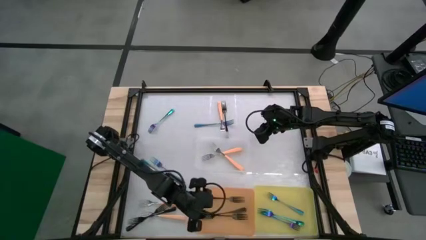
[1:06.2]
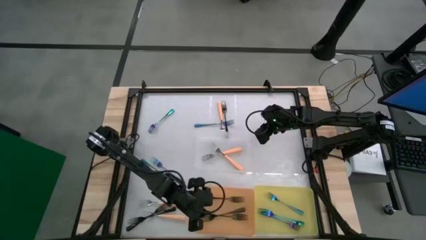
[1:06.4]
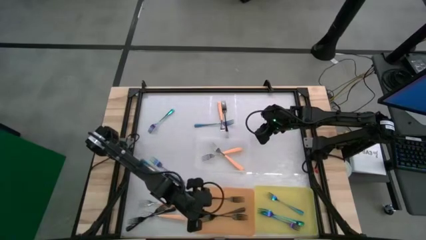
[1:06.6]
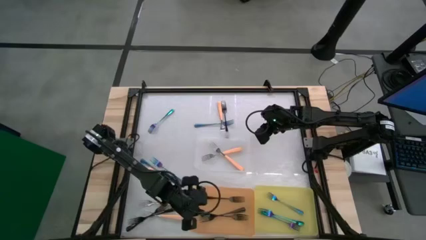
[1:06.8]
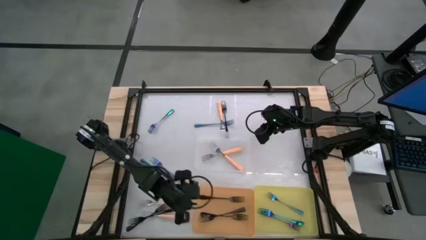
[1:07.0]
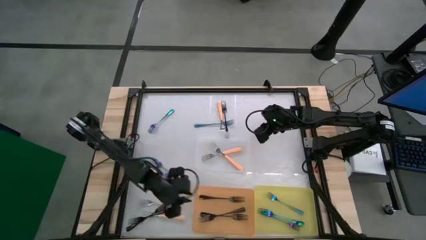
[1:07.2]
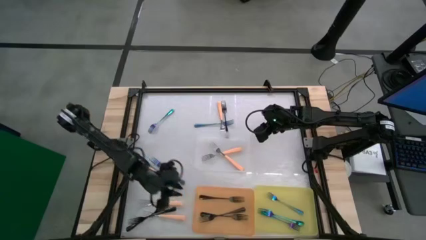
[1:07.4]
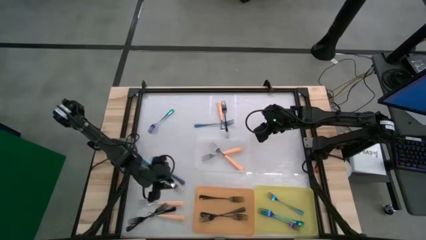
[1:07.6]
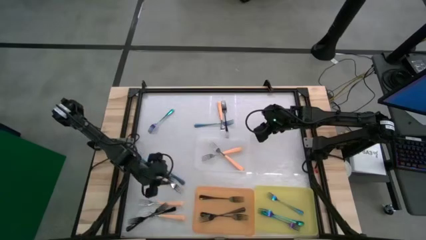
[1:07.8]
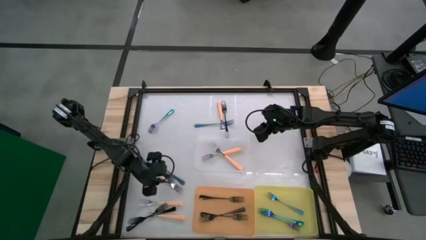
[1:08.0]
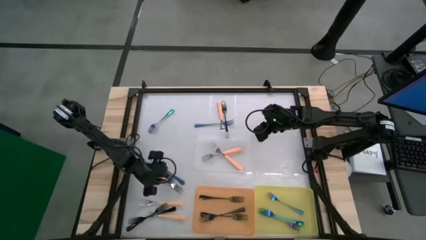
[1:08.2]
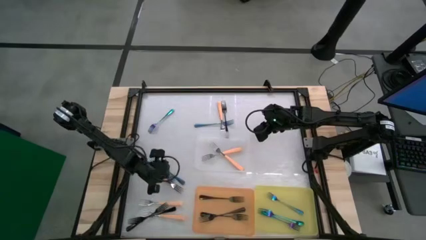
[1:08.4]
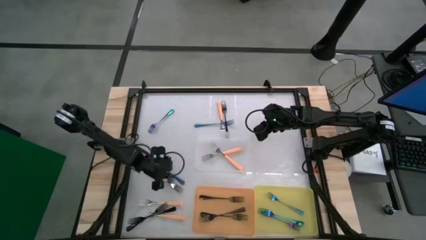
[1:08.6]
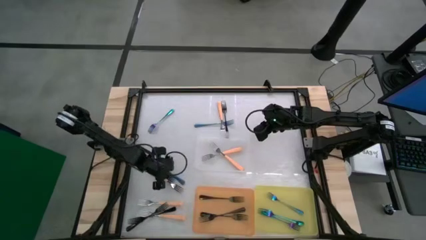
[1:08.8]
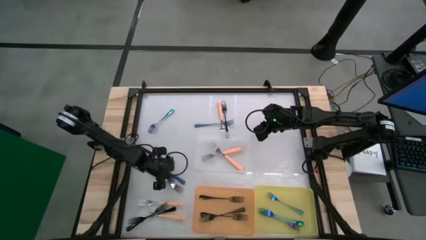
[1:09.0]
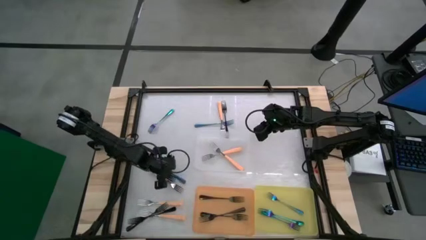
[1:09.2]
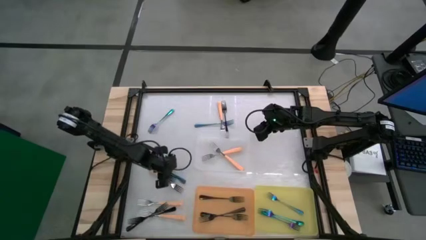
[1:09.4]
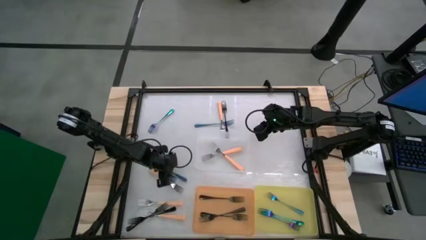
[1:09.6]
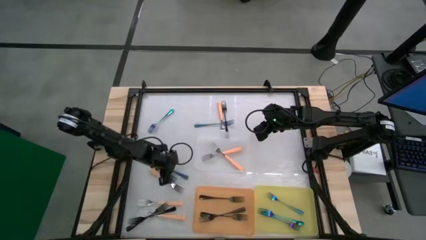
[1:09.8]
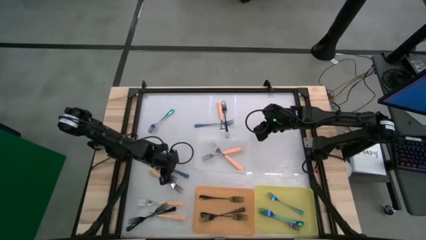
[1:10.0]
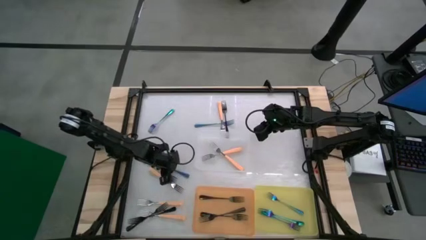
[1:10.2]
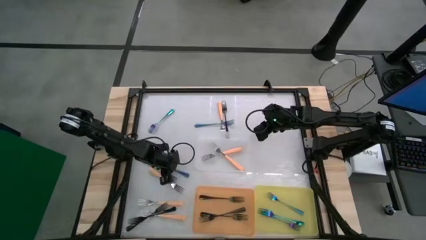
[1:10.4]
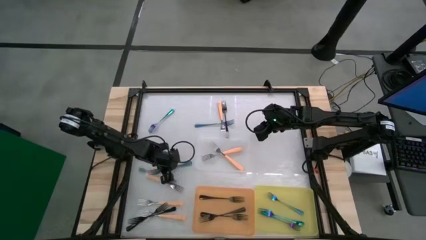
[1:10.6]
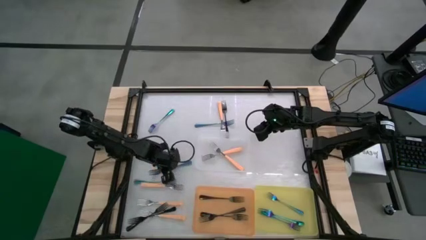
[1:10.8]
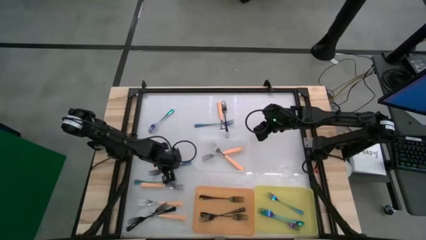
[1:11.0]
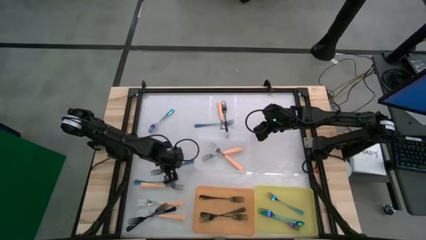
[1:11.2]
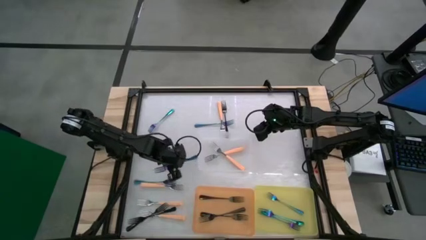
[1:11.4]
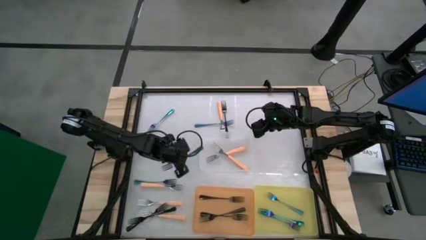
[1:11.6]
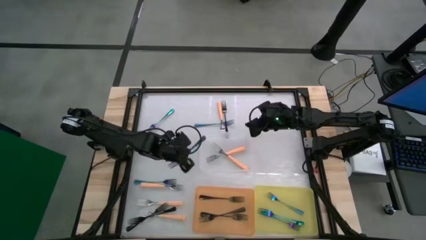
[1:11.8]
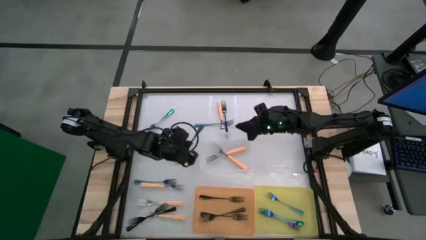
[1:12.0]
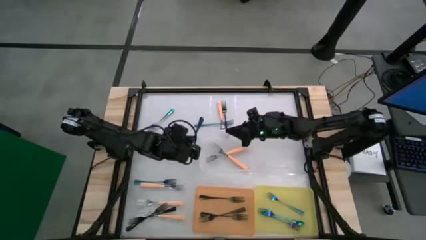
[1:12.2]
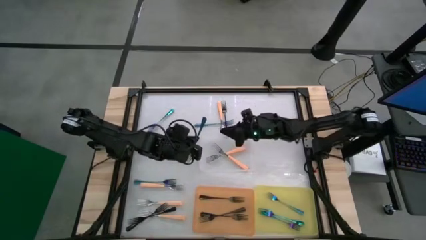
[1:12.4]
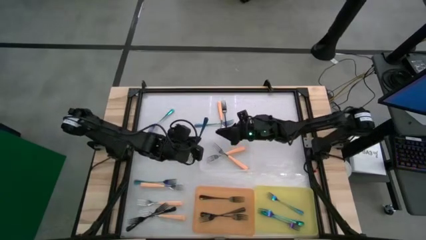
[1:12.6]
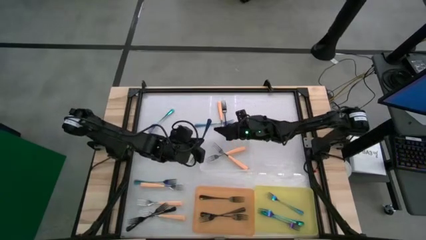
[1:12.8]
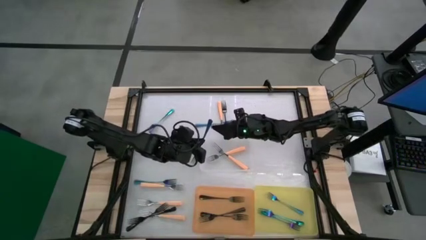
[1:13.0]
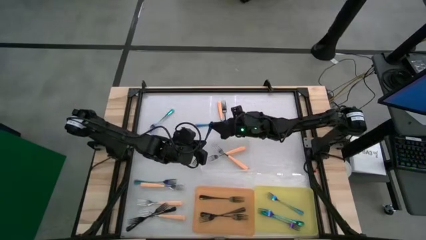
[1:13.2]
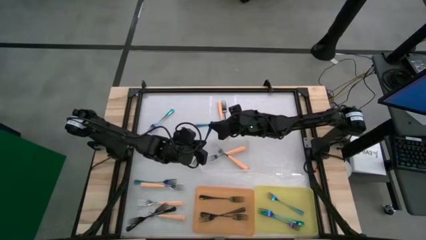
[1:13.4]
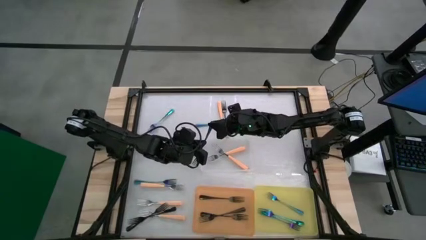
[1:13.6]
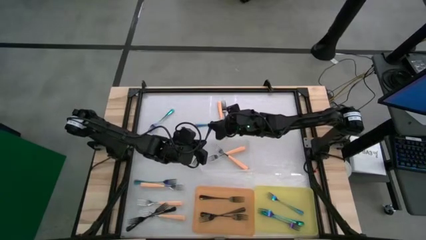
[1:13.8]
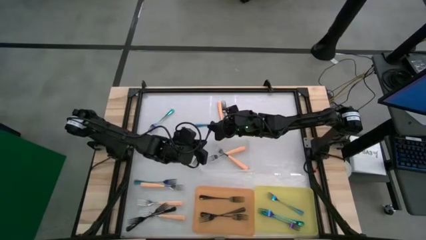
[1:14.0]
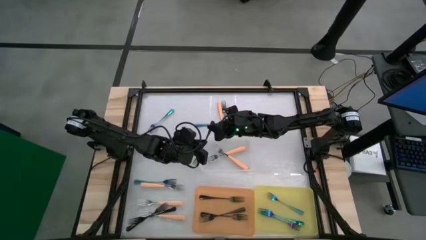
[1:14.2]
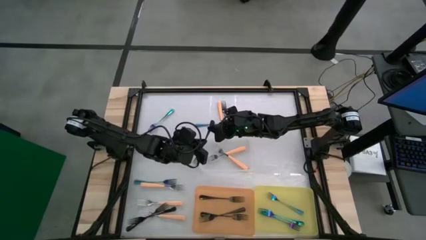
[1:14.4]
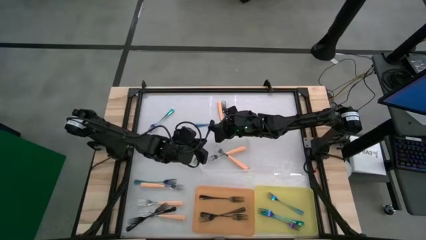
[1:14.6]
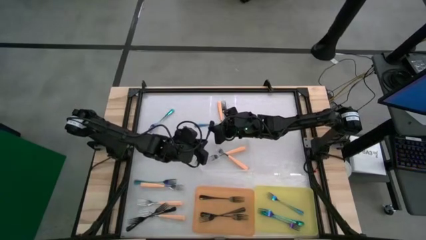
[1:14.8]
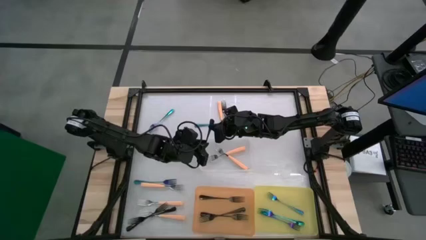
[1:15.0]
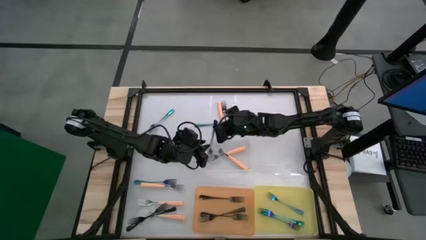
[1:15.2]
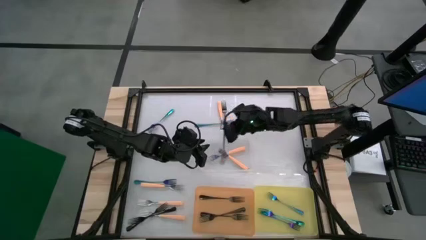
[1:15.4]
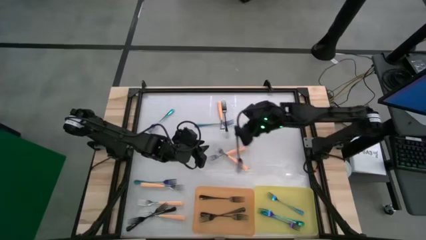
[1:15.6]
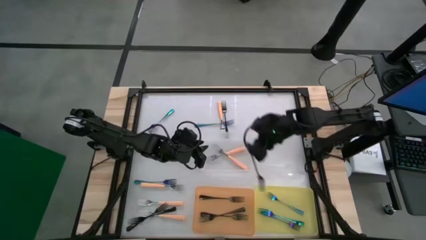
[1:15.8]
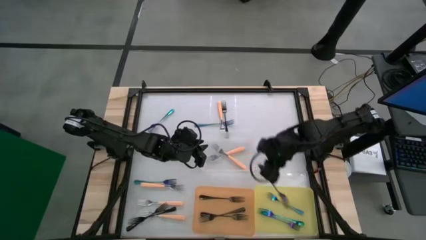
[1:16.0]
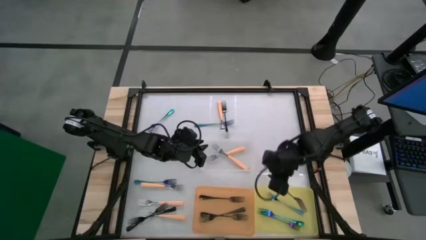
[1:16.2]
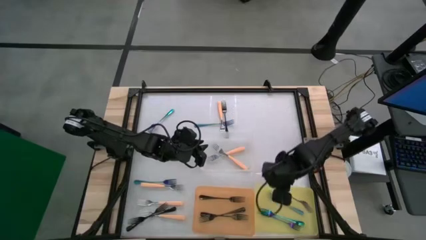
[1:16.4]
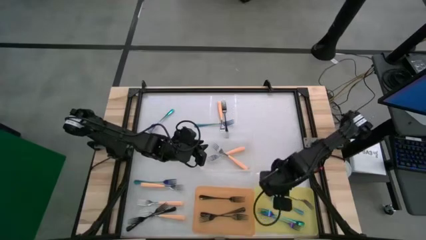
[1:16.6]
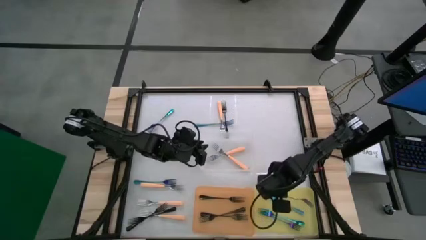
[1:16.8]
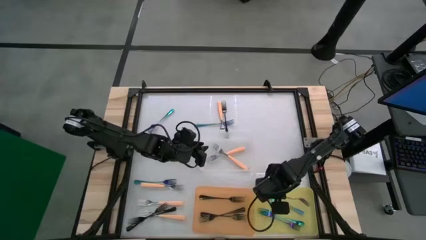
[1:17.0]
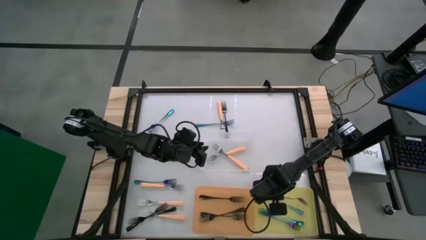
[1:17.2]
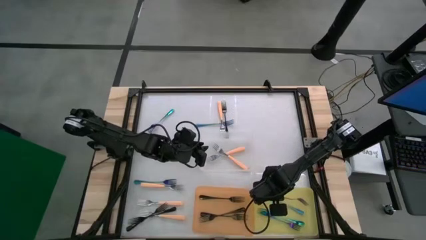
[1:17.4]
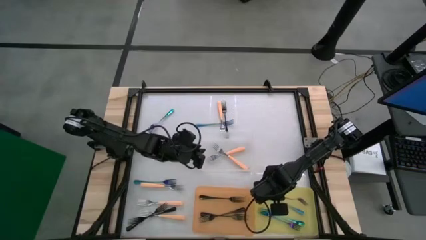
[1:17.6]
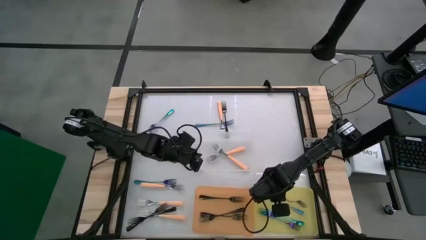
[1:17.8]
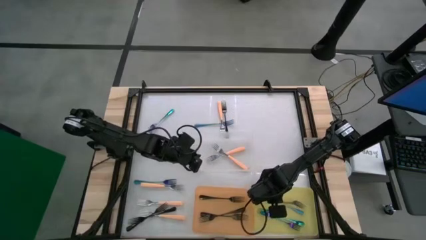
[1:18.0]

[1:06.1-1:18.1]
Task: Sort silverware by color (type)
Put the blue fork into the yellow bin

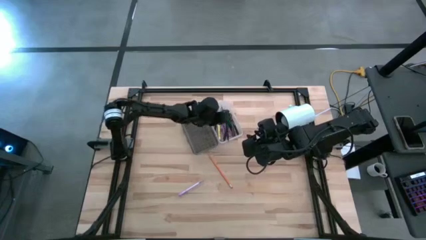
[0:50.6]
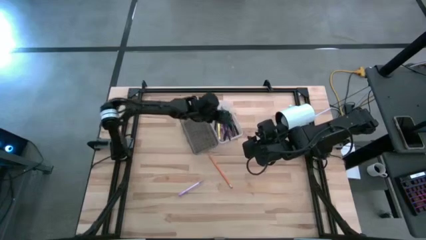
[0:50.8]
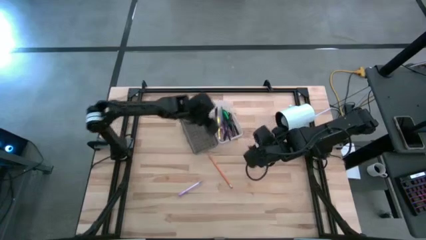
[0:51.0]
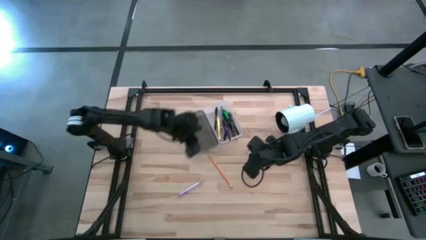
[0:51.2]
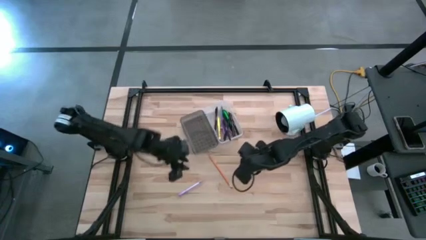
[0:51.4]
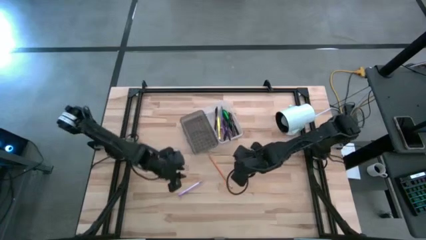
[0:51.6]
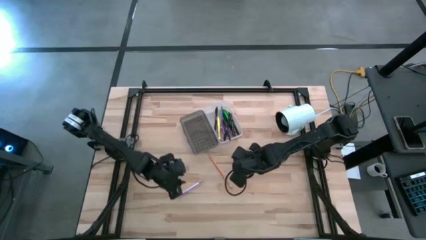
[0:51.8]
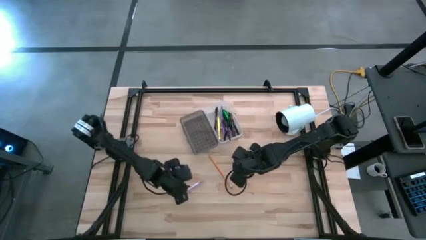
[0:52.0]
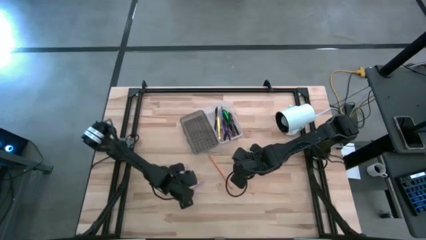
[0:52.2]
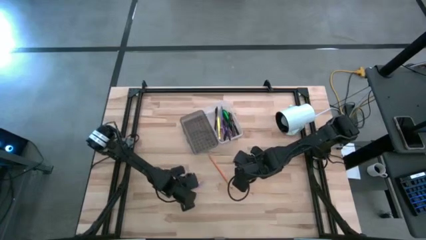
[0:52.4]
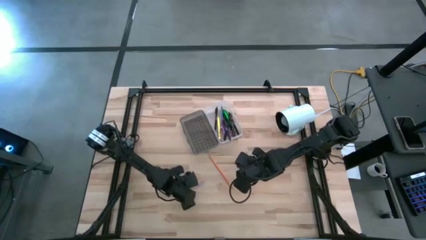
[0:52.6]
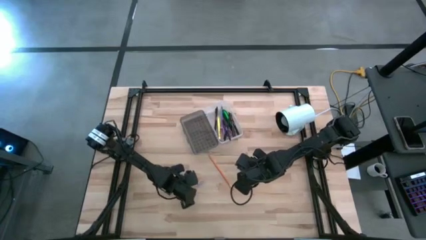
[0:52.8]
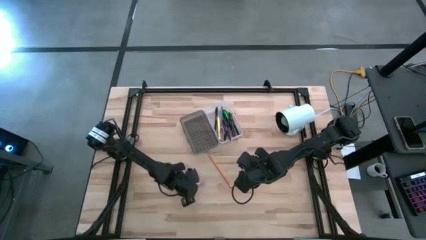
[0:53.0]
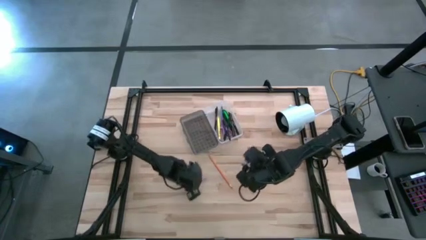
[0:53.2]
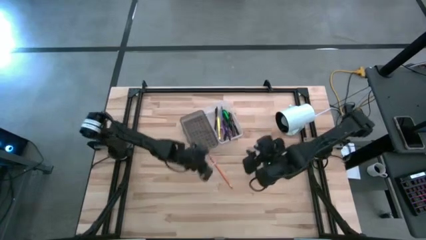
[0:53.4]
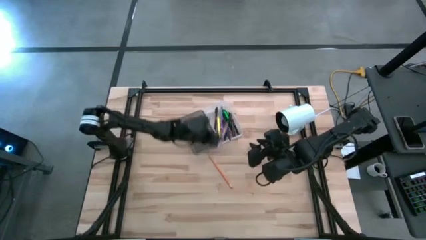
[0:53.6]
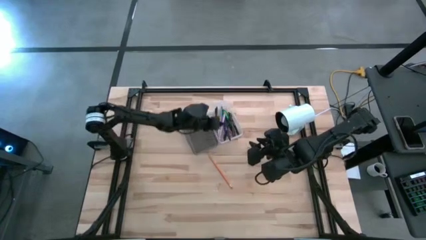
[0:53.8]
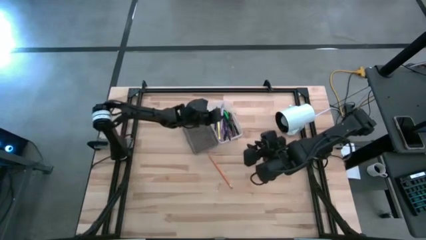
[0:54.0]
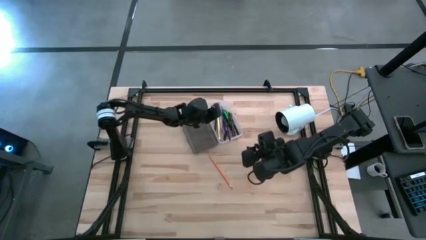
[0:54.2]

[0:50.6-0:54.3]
Task: Pick & place school supplies into a supply box
Put the purple pen into the black supply box

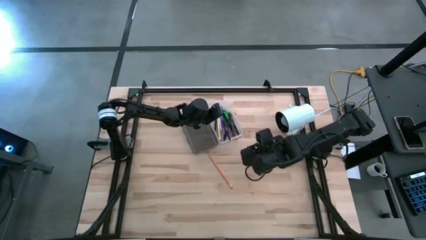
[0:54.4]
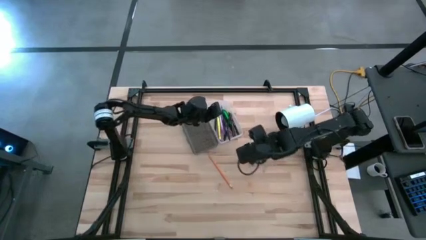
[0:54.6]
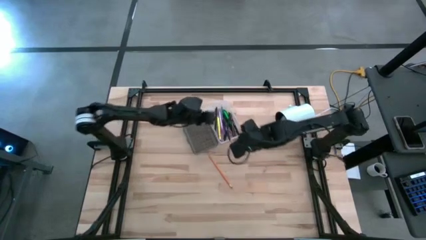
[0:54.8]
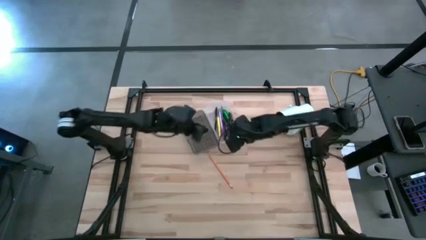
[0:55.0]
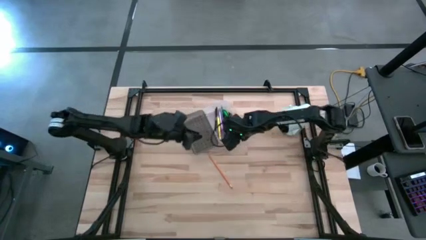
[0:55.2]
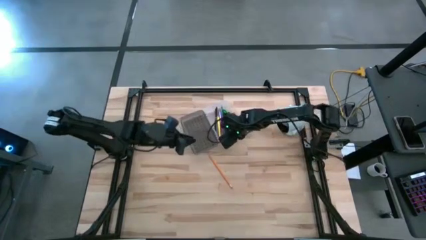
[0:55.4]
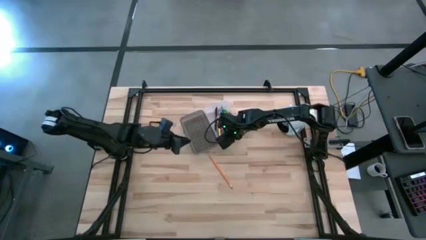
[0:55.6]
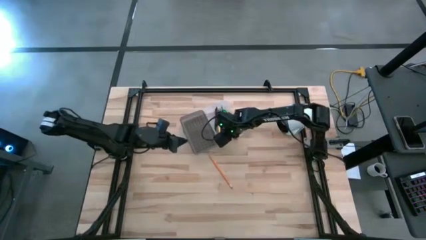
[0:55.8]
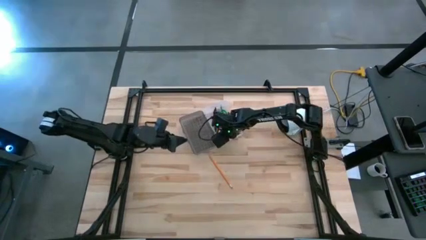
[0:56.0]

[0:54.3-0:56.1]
Adjust the black pen in the black supply box
